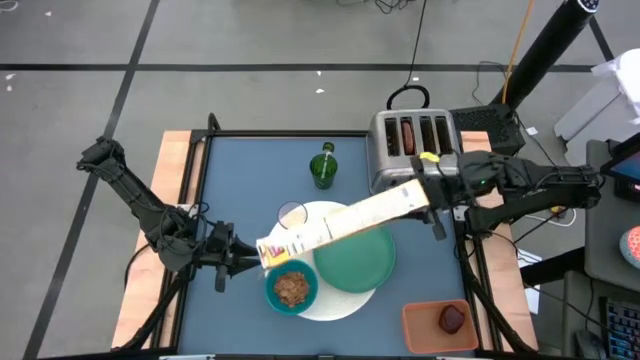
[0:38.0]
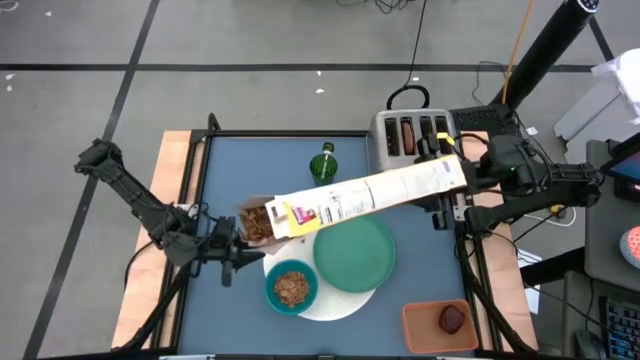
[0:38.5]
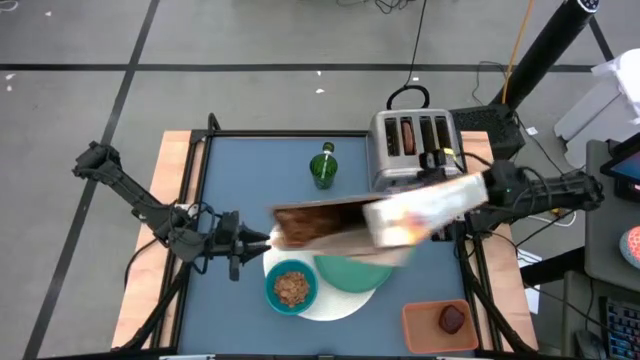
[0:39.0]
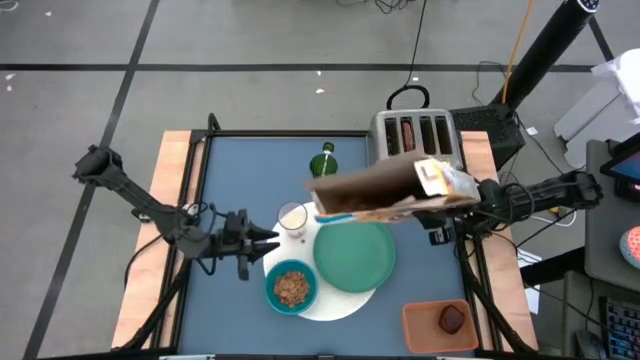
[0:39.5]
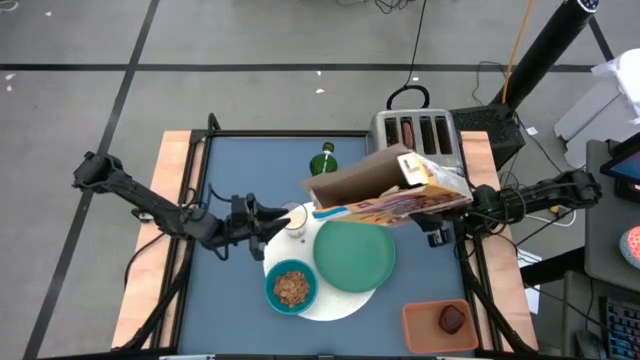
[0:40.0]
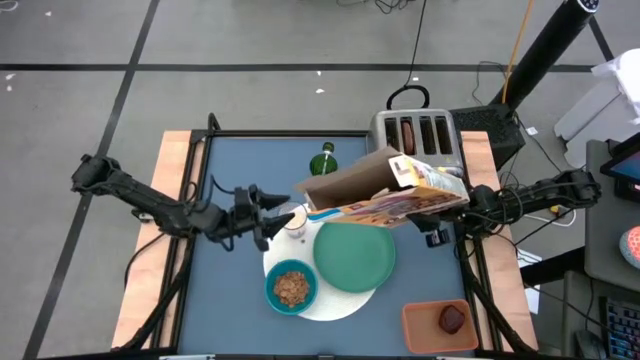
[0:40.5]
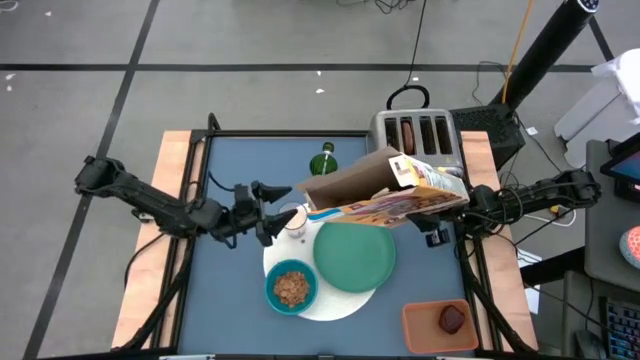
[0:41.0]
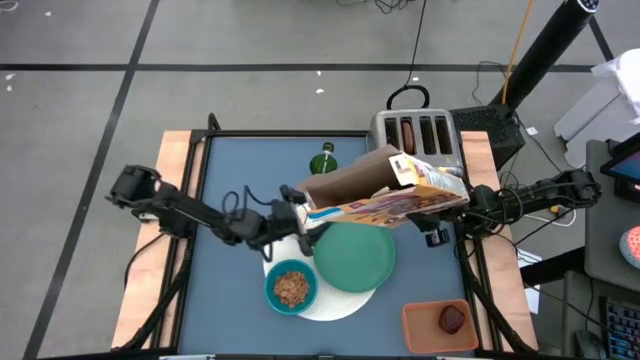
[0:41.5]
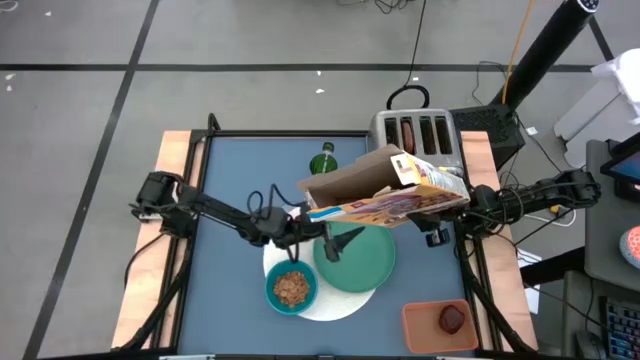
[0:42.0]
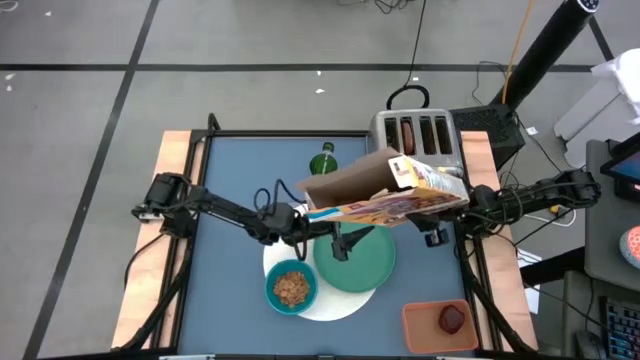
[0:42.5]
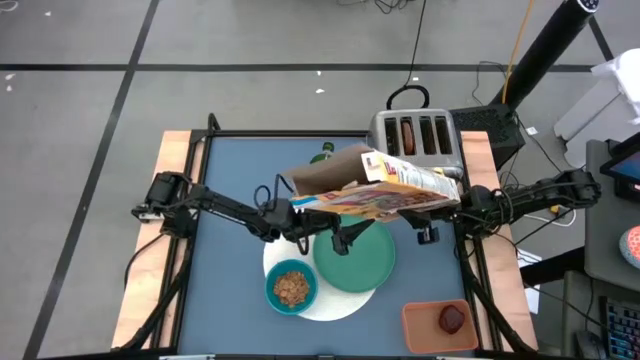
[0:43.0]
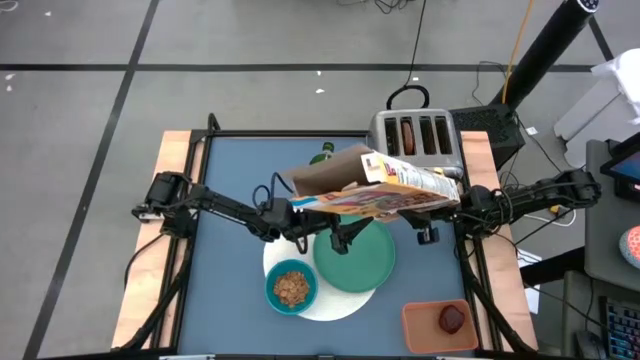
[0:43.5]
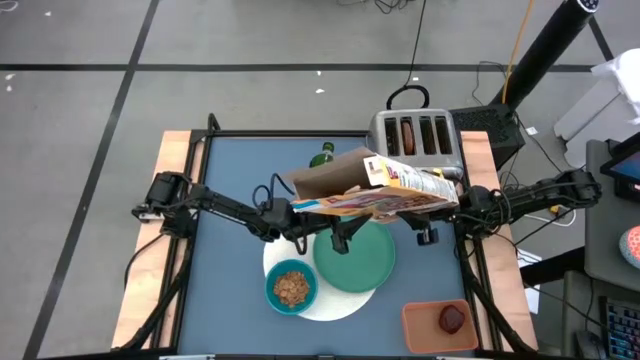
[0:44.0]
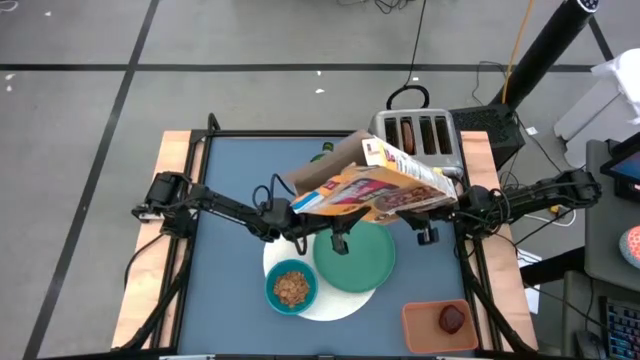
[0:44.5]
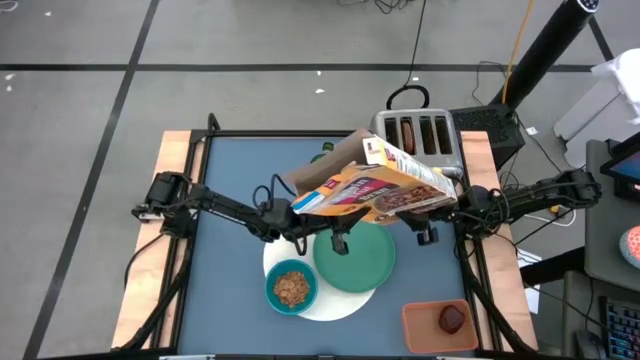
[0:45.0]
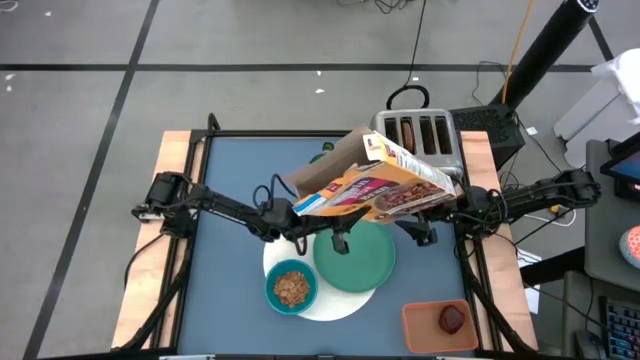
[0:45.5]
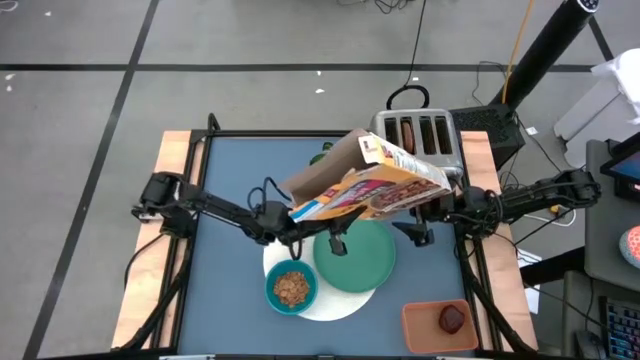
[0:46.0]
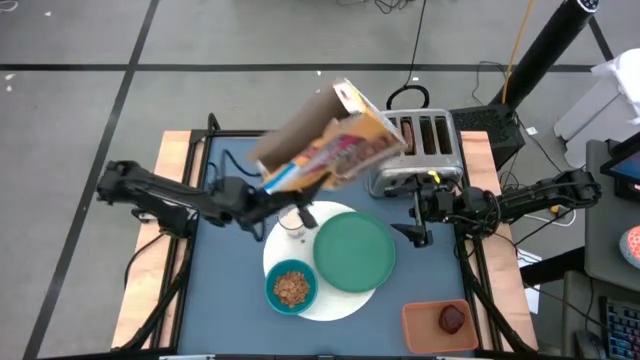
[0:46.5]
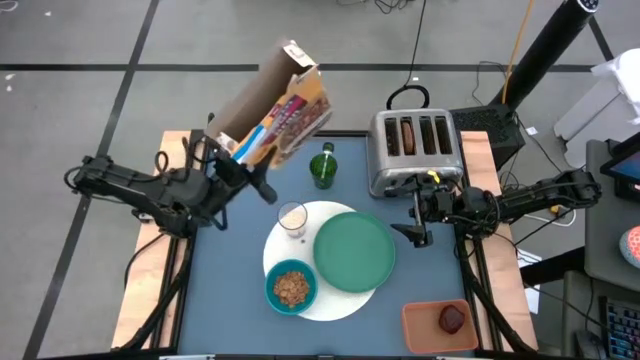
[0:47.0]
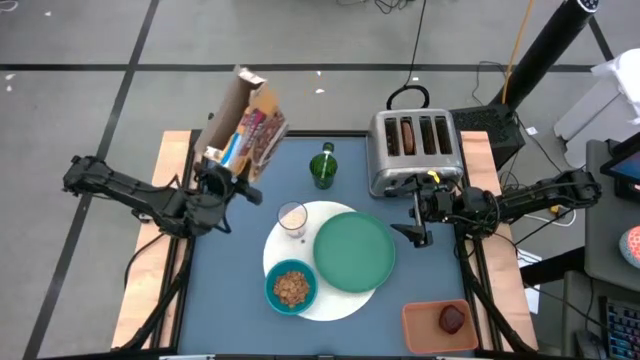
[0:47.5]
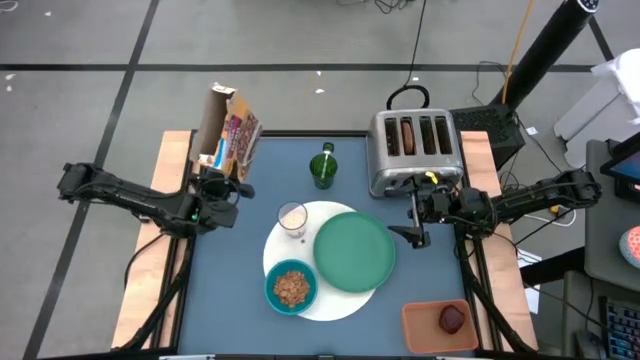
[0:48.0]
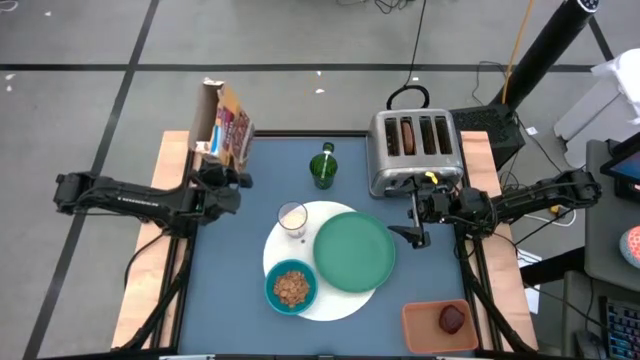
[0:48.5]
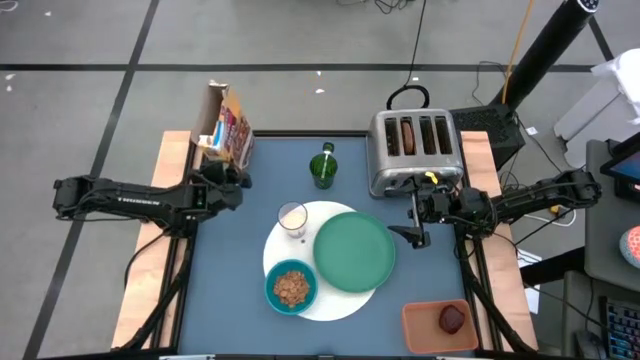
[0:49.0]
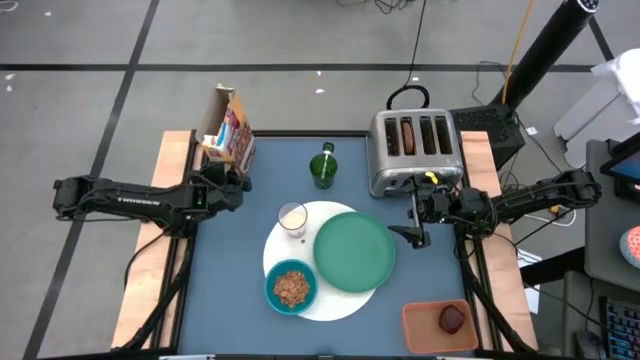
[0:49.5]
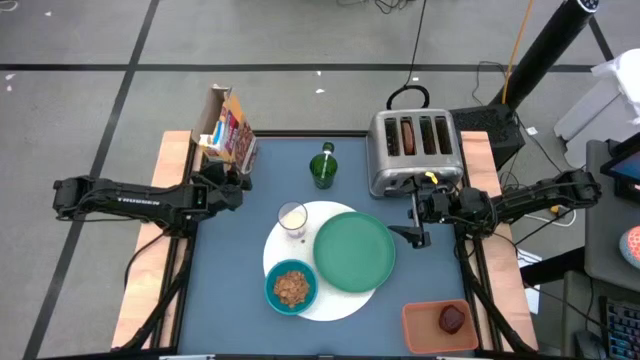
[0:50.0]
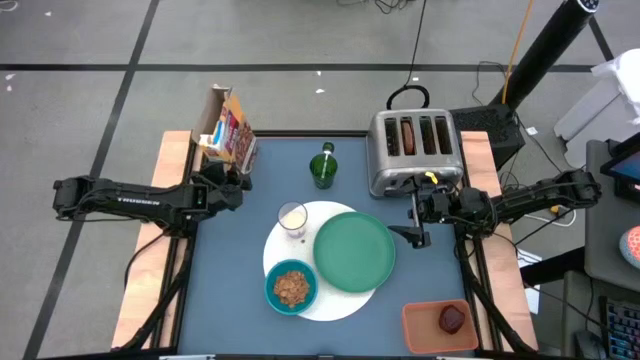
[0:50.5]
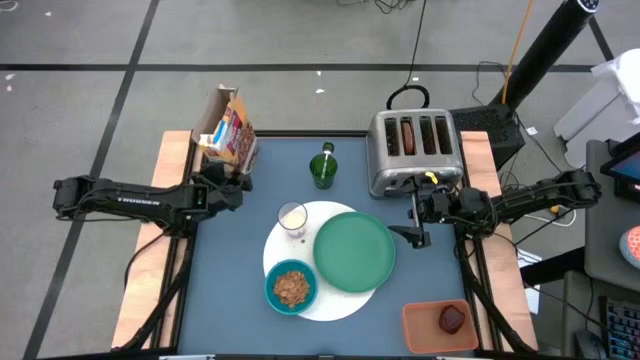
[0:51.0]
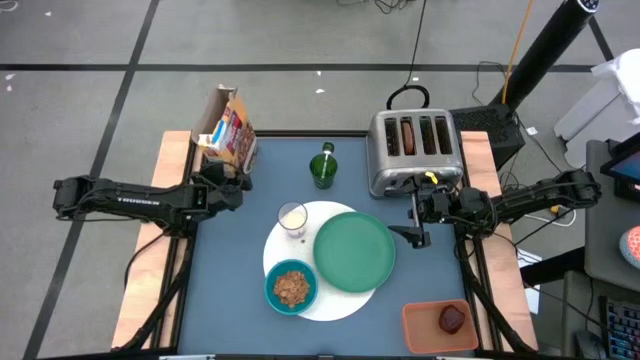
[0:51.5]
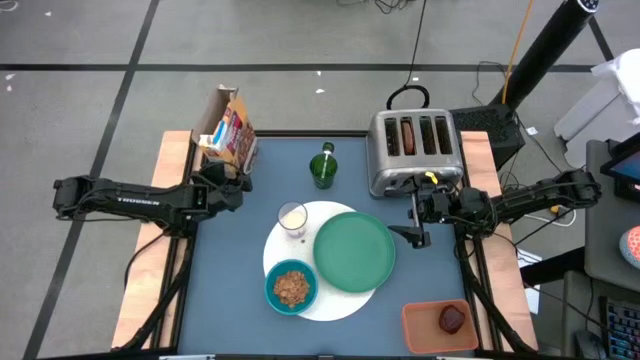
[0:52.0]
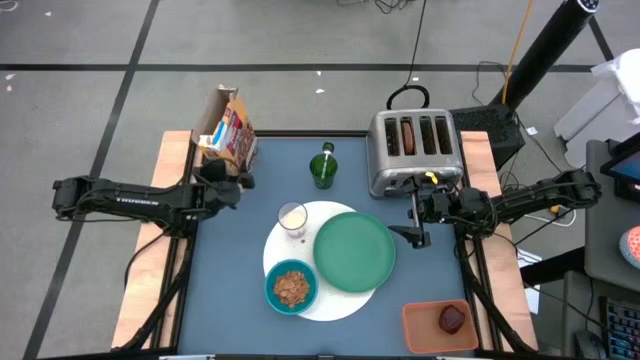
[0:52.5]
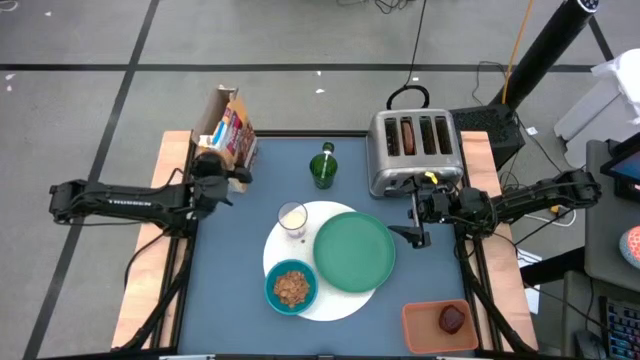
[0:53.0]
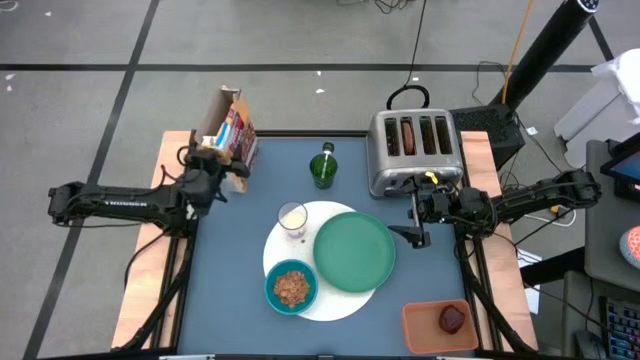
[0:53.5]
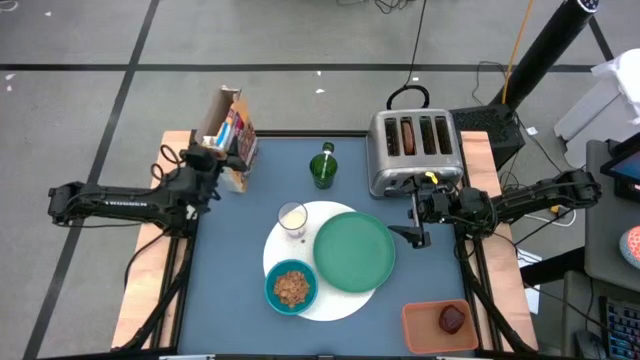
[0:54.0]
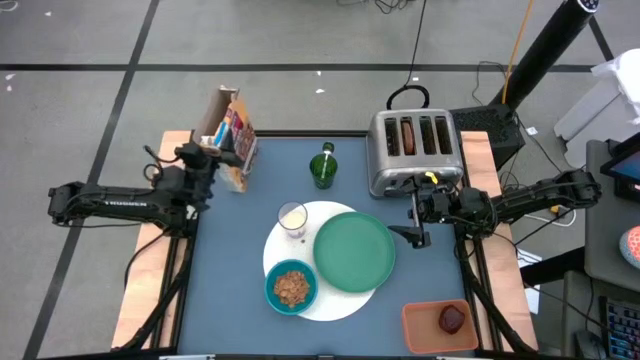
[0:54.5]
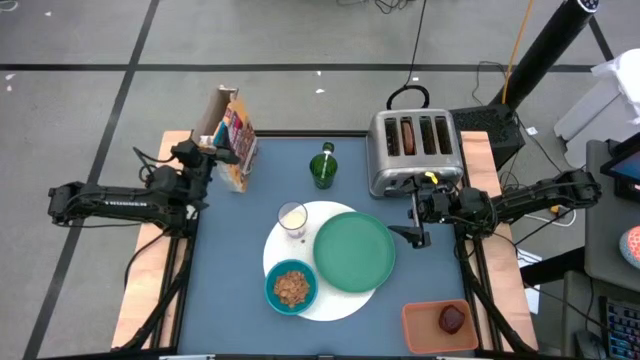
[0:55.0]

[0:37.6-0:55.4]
Task: Arrange a breakfast setting
Pour the cereal from the cereal box into the blue bowl

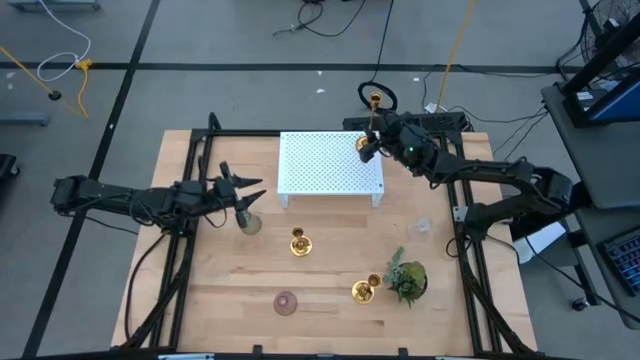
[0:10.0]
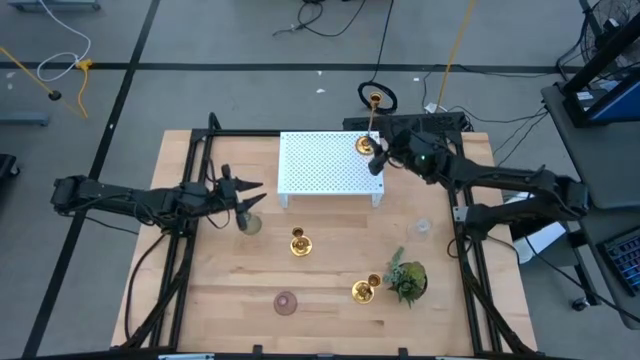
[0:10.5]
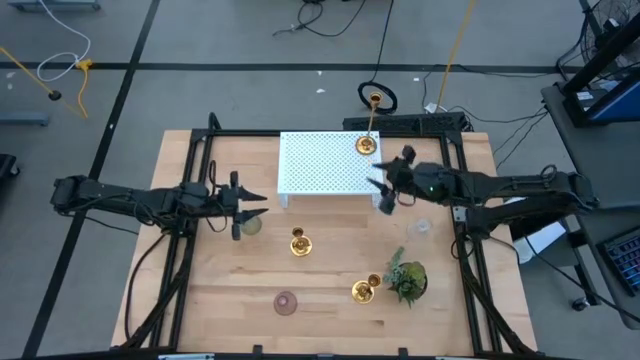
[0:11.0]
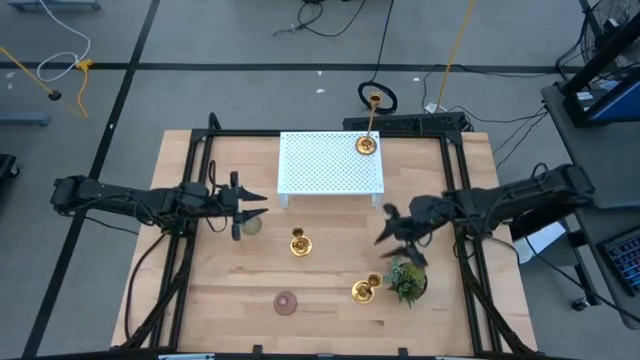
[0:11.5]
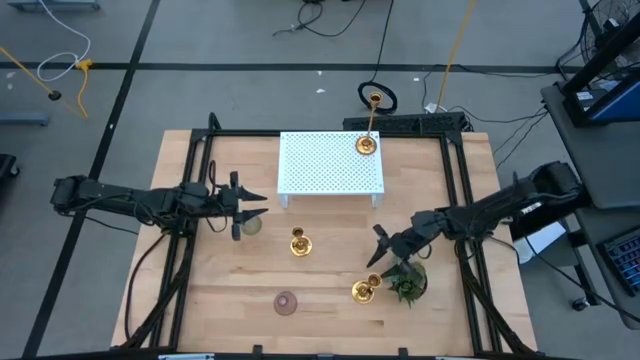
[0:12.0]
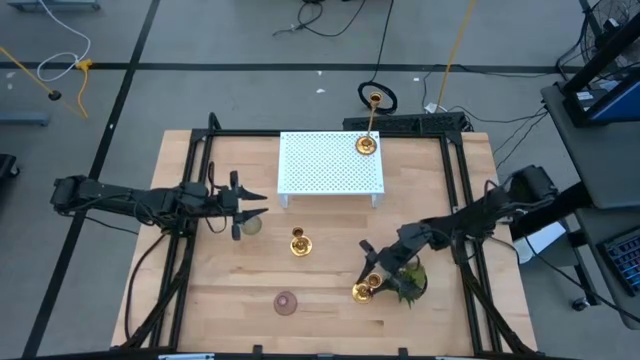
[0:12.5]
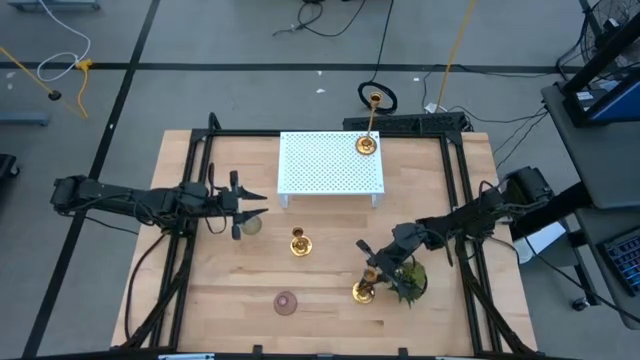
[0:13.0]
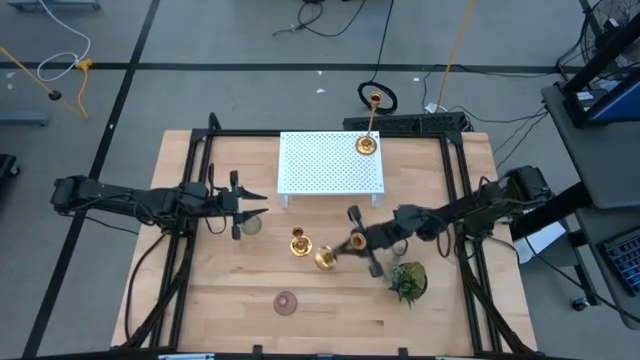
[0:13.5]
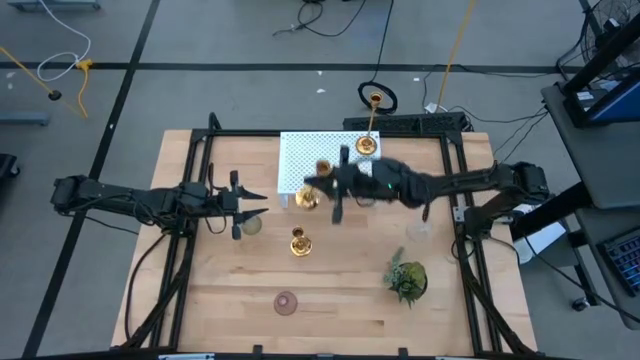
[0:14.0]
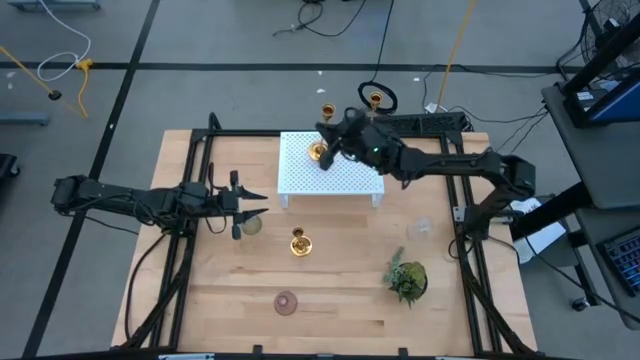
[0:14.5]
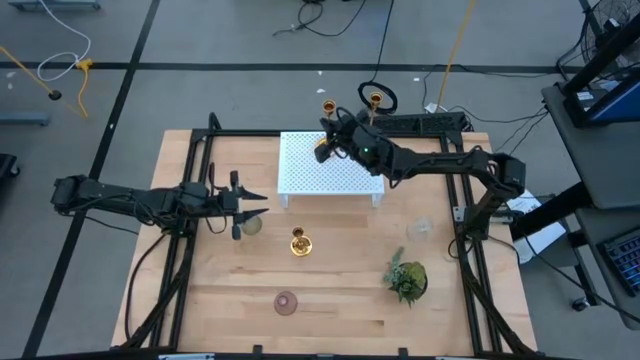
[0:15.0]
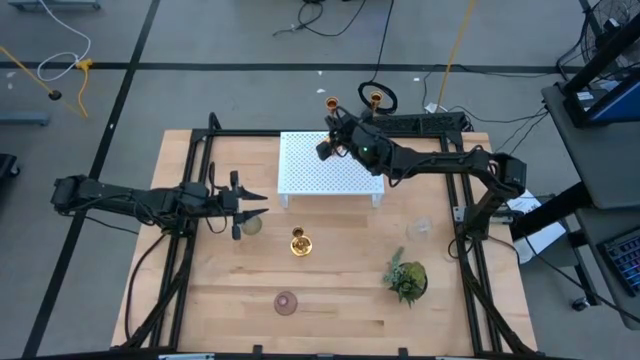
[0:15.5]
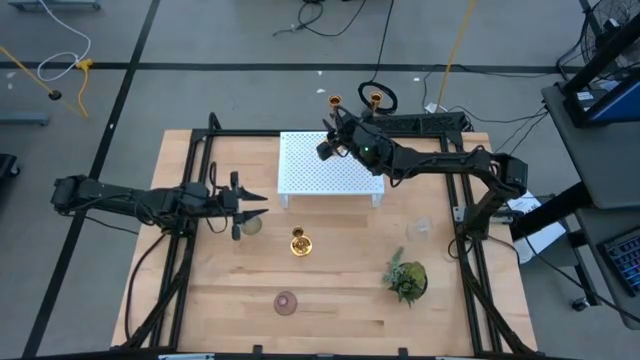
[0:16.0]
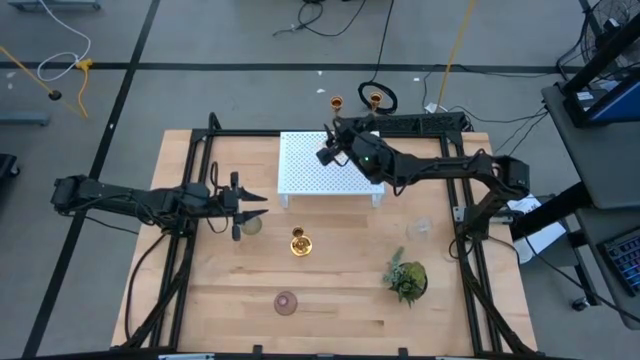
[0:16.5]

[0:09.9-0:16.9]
Task: Pick & Place candle stick holders
Put the bottom gold candle holder on the shelf
